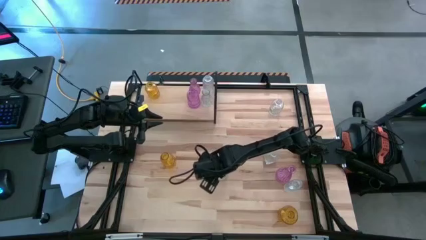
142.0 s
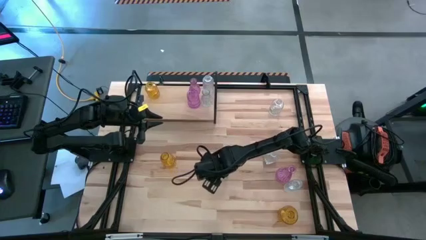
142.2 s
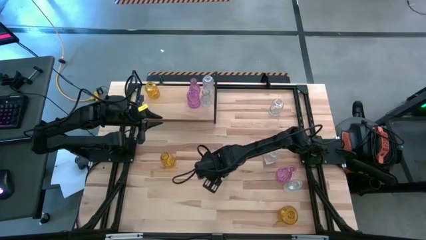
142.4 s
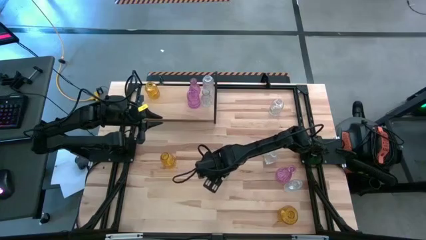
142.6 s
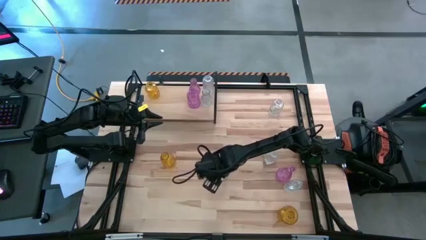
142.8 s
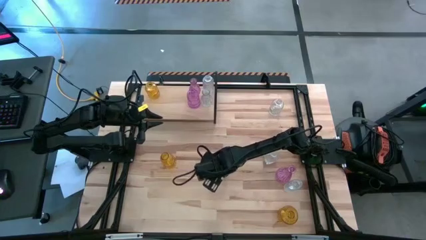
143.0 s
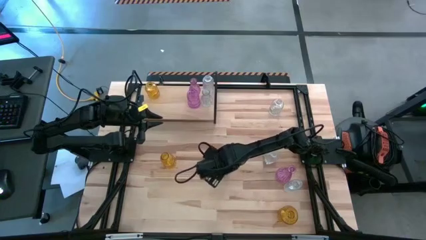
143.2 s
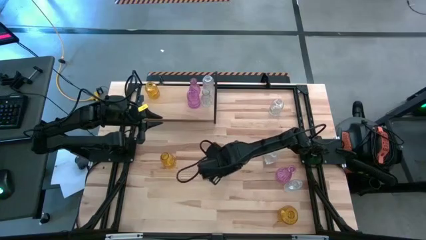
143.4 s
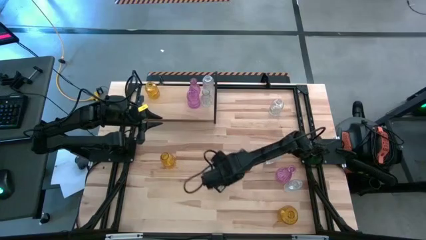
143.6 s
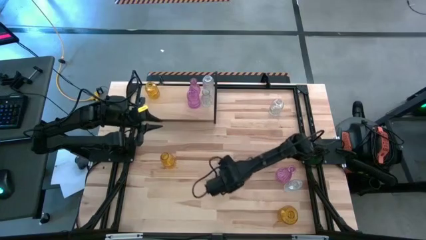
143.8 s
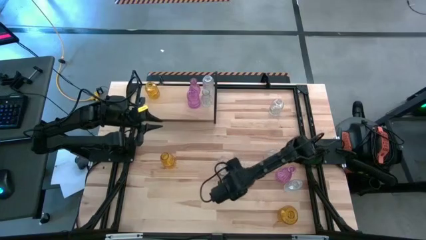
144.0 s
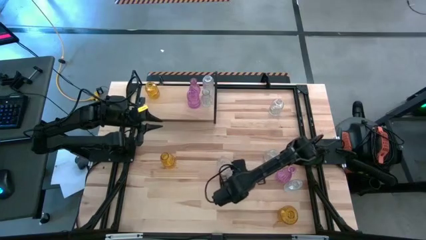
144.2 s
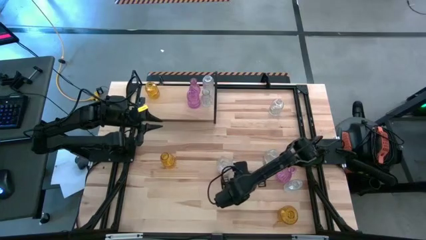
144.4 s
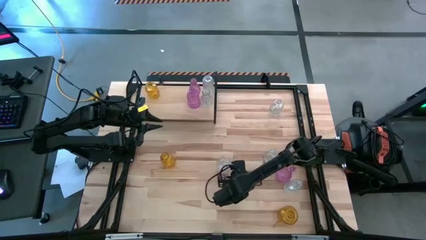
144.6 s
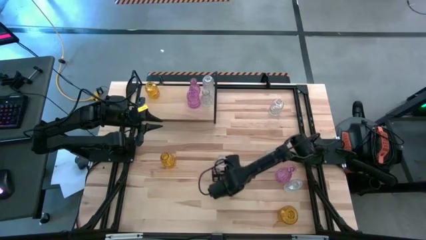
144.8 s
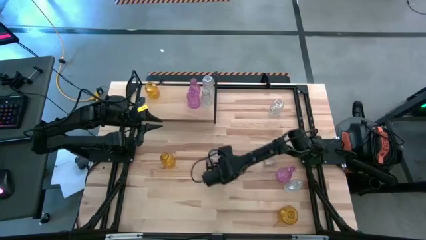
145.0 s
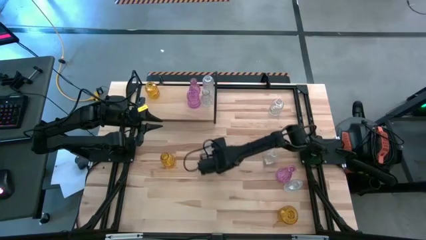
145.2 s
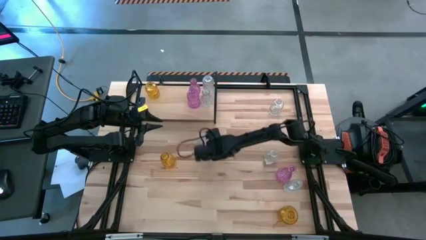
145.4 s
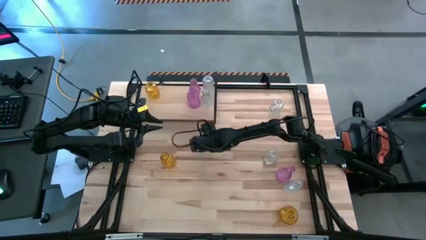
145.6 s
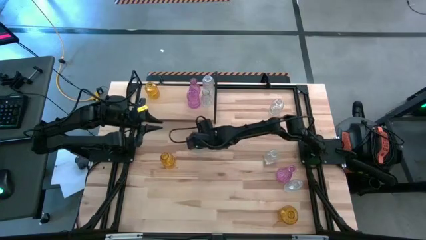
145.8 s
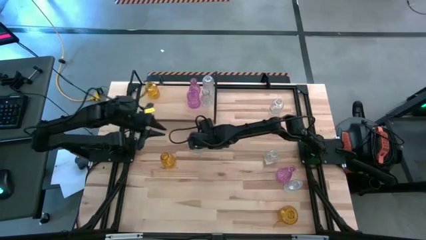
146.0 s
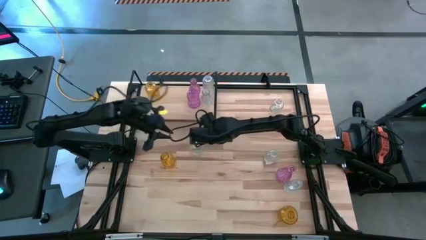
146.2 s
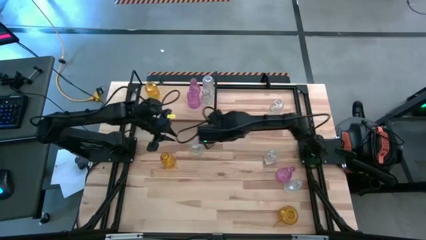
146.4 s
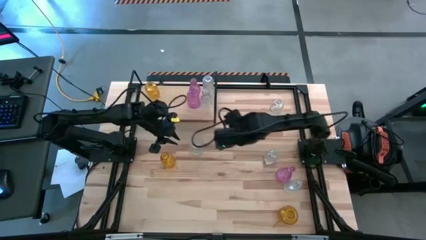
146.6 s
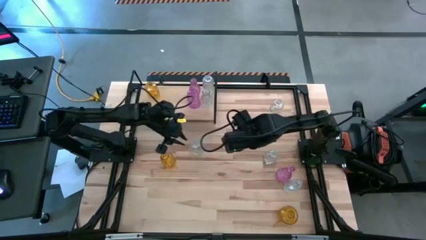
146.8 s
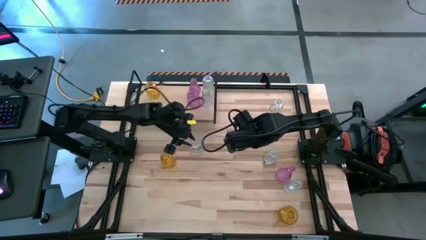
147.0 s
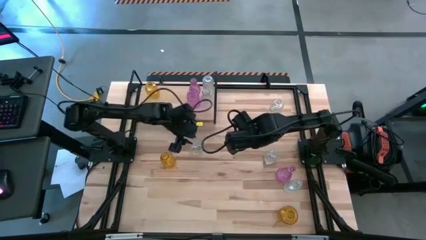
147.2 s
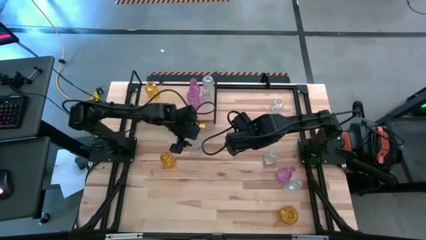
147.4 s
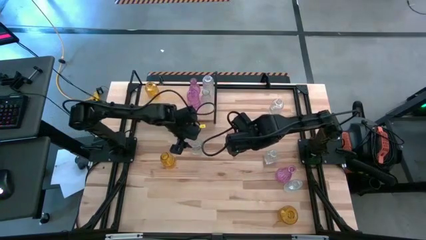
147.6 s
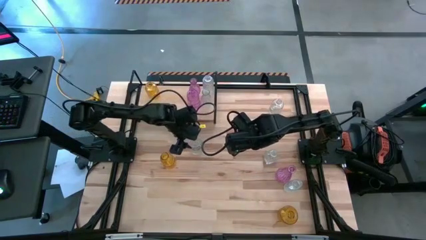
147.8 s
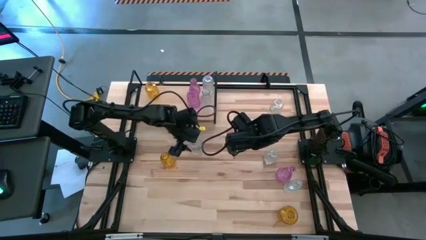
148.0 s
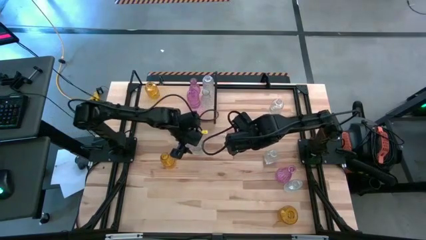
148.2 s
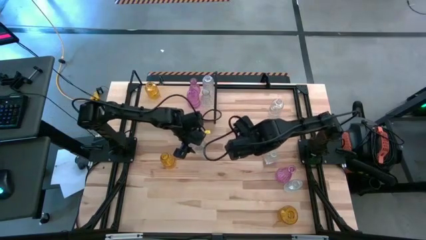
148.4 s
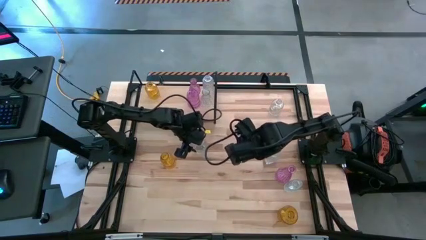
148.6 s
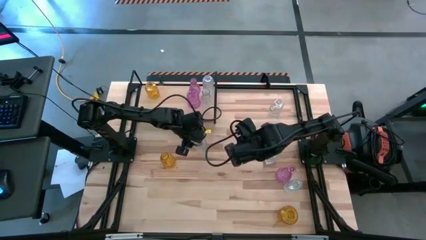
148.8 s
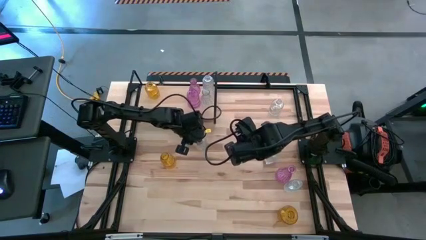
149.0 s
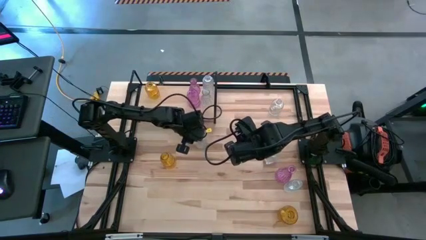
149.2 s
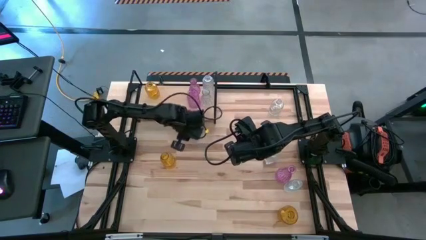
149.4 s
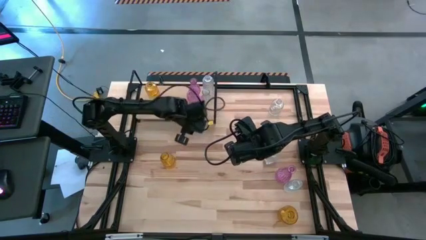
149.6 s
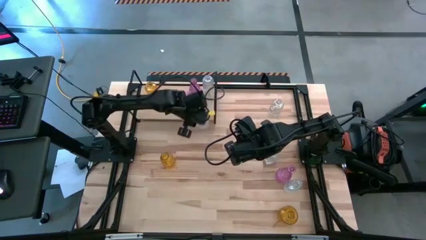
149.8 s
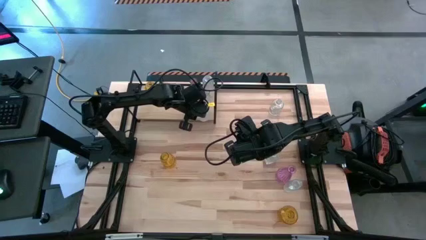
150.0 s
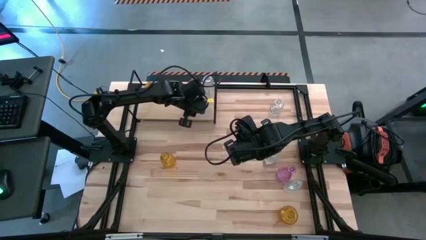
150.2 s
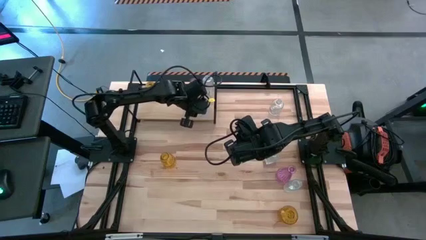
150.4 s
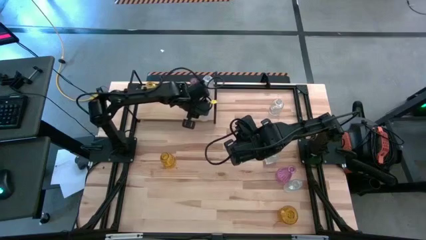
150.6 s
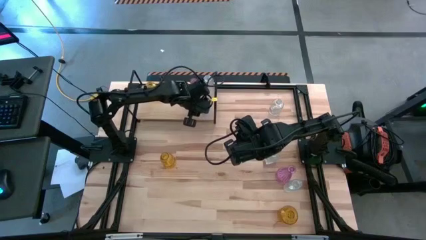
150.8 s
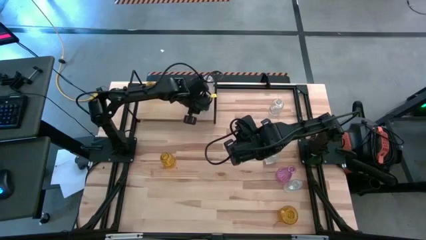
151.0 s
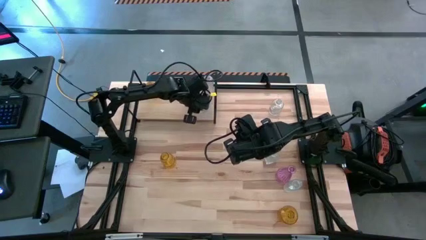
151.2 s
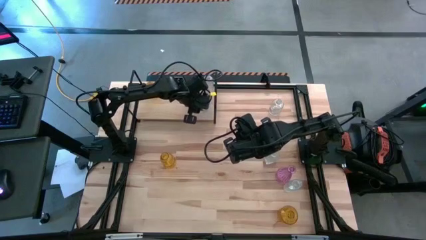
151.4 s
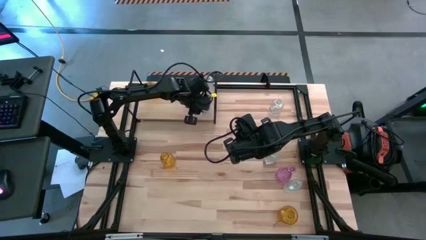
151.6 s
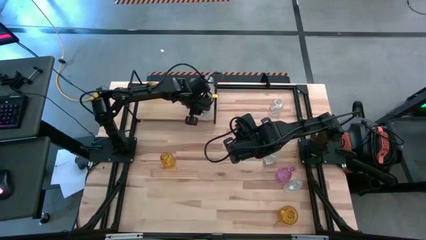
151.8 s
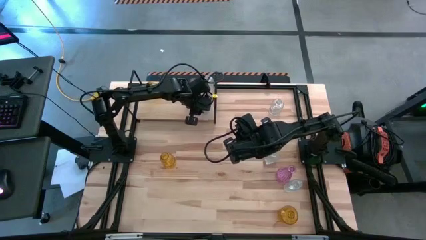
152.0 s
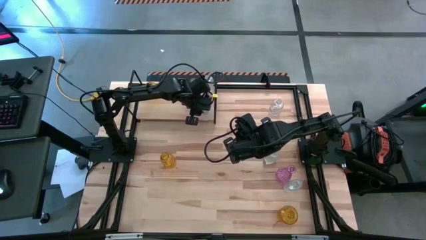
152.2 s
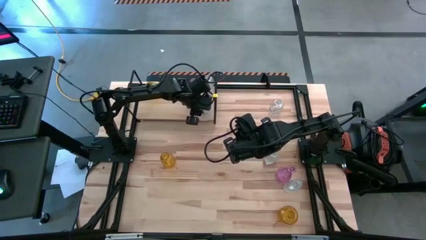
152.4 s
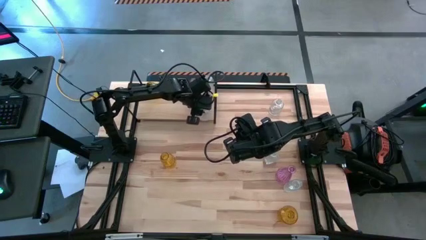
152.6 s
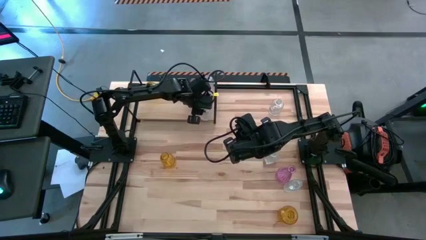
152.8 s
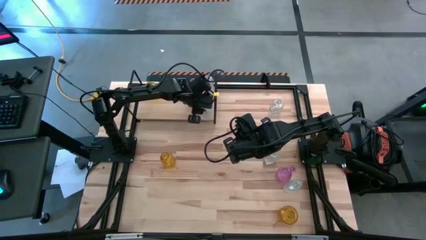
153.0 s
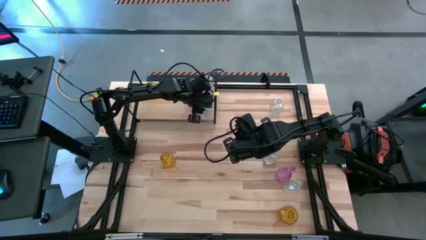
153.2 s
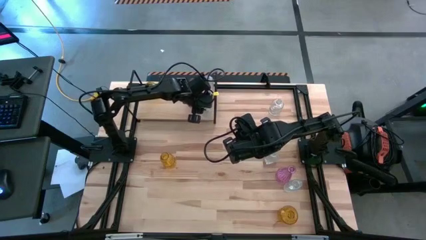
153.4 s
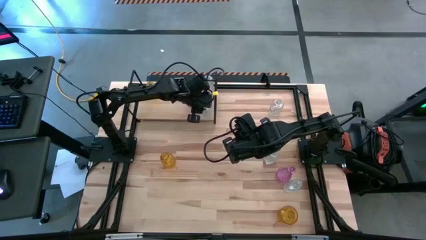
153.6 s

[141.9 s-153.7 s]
Task: sort vases onto shelf
Put the transparent vase on the shelf aligned with the other transparent vases

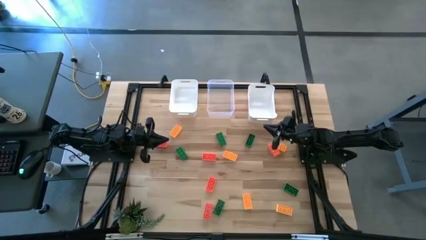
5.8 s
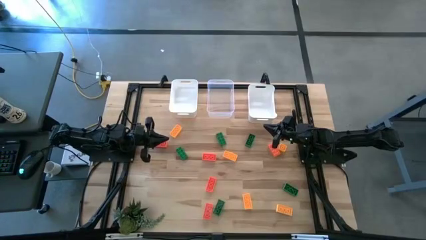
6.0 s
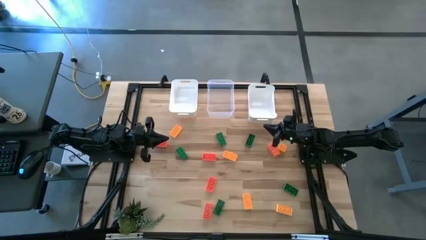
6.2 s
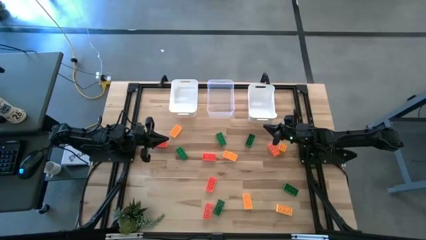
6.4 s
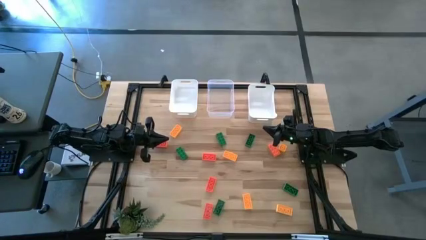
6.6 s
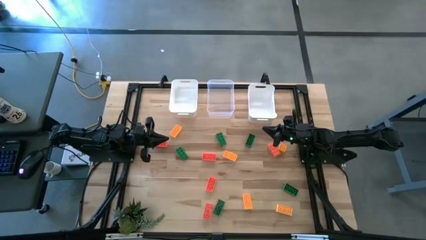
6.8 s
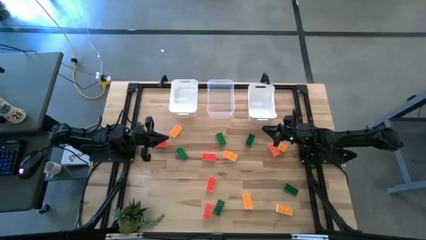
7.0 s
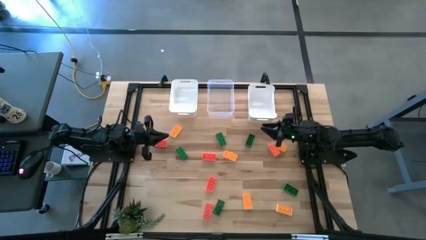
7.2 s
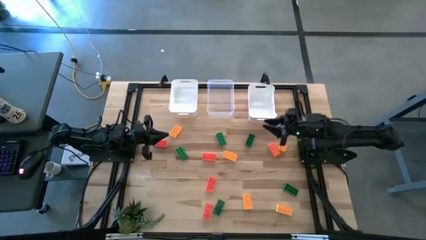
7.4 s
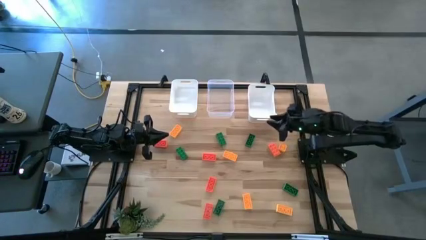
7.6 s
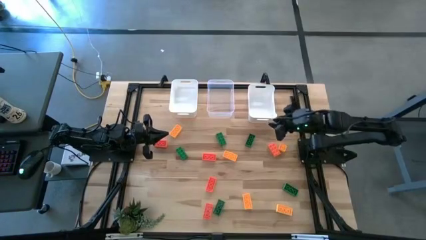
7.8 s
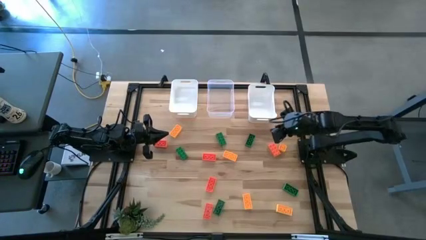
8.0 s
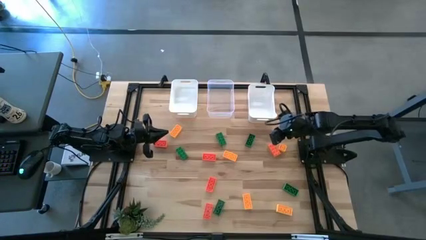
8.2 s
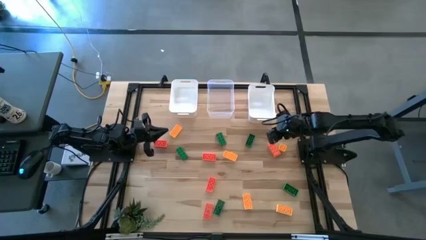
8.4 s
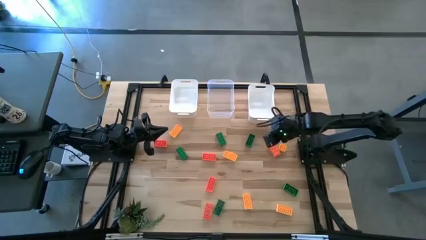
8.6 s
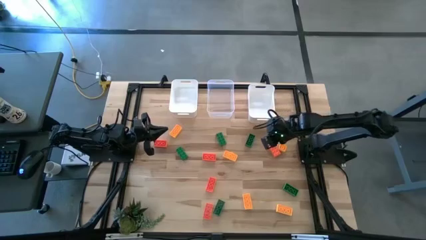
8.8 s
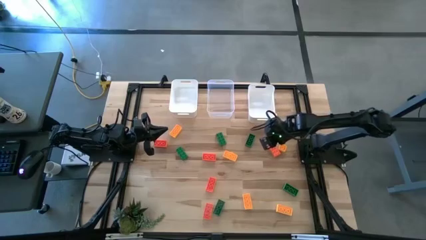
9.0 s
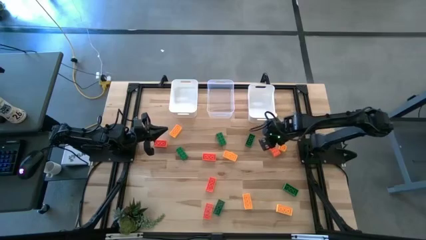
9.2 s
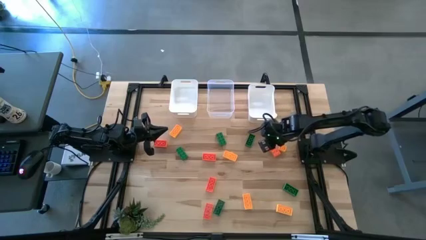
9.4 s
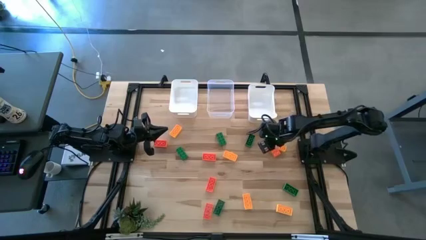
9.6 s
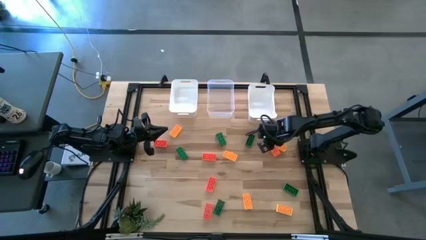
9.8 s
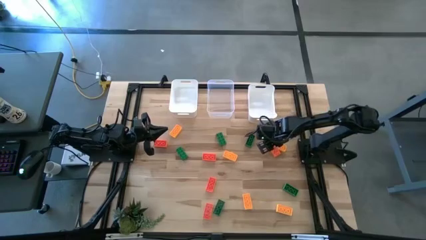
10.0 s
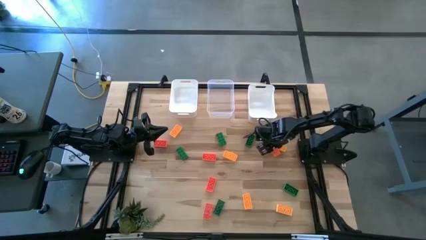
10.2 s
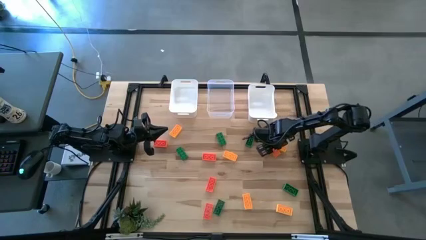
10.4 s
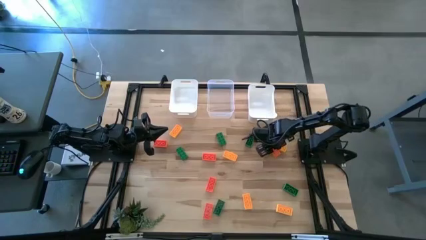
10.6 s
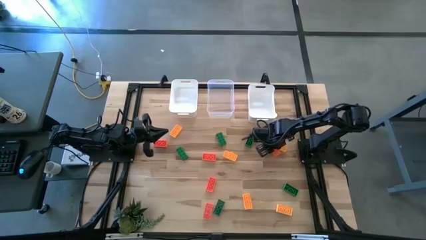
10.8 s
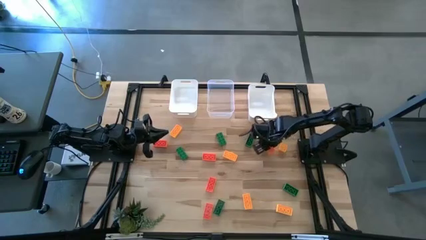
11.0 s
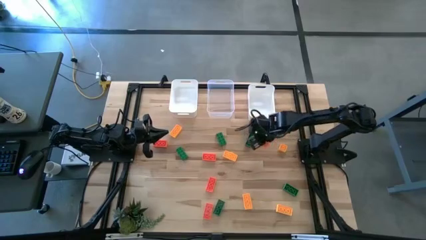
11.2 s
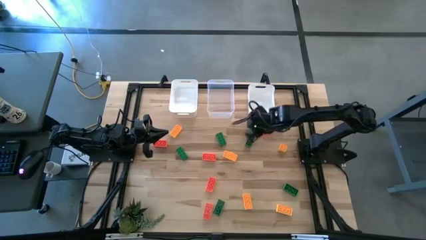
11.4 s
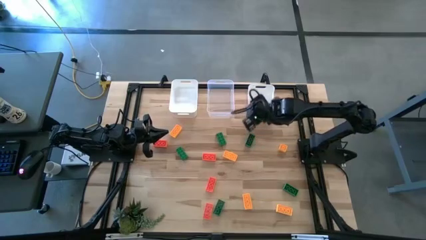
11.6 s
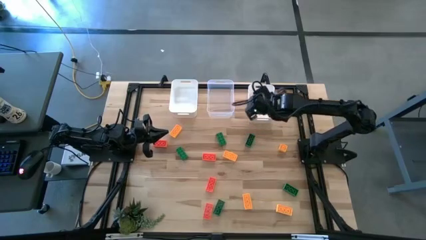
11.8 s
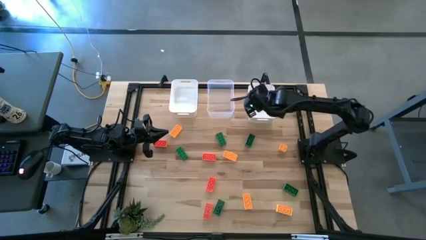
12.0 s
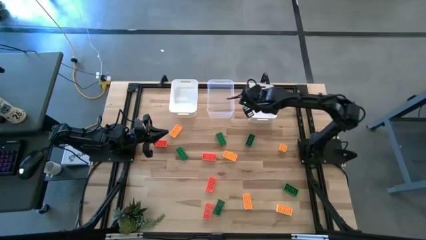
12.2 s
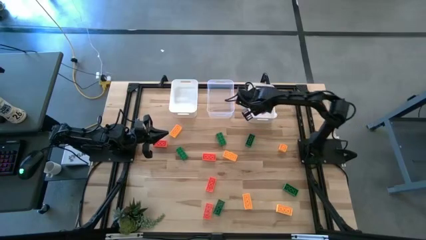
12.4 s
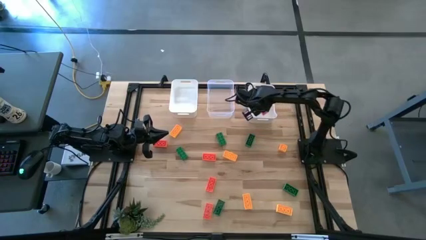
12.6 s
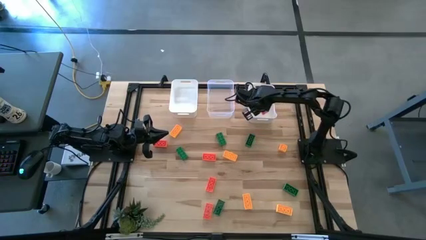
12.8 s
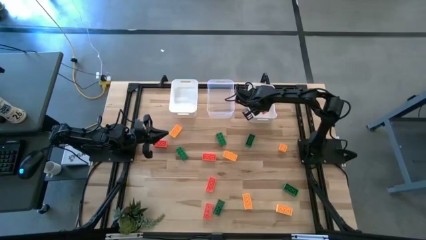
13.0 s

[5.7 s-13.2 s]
Task: Sort & place blocks by color
Put the orange game piece into the right white bin
